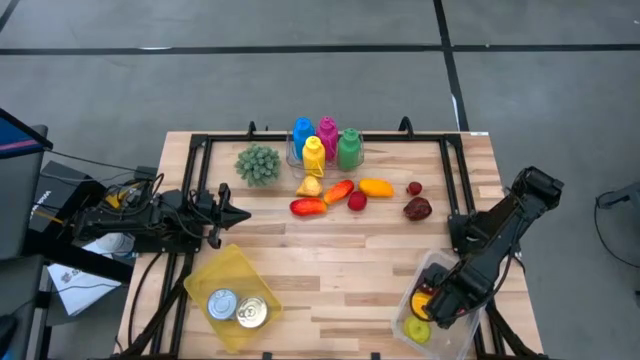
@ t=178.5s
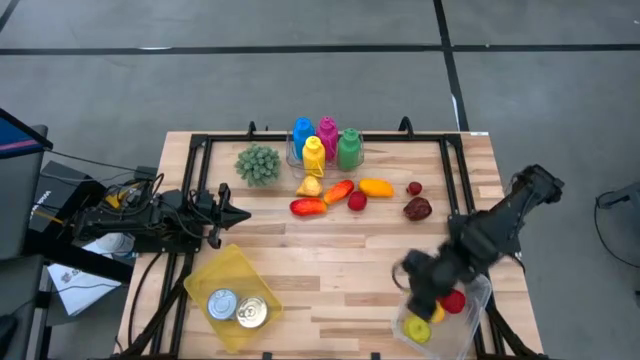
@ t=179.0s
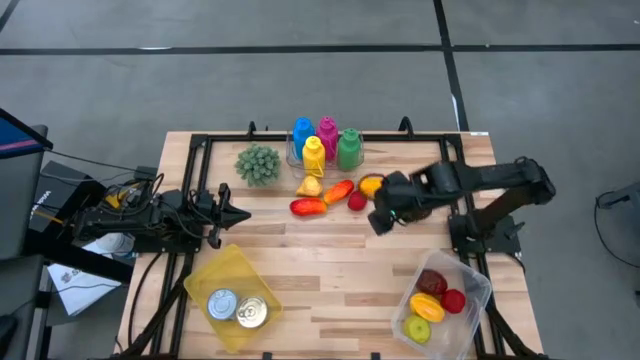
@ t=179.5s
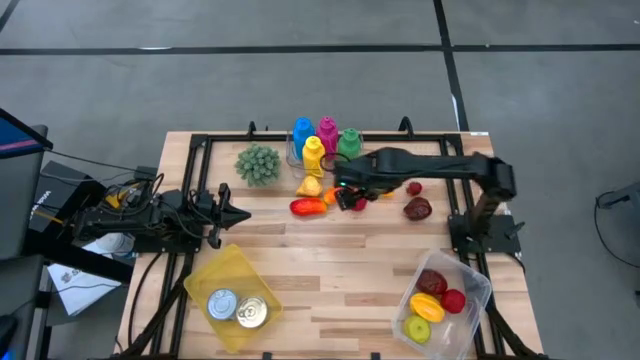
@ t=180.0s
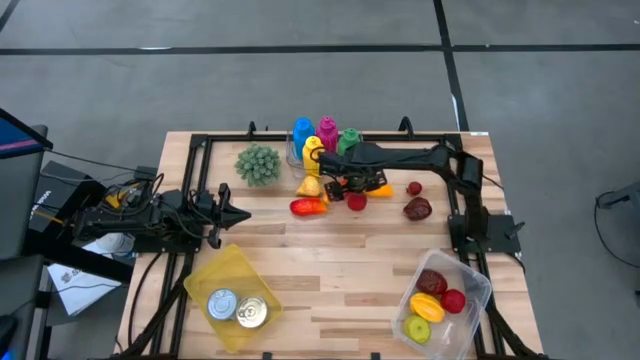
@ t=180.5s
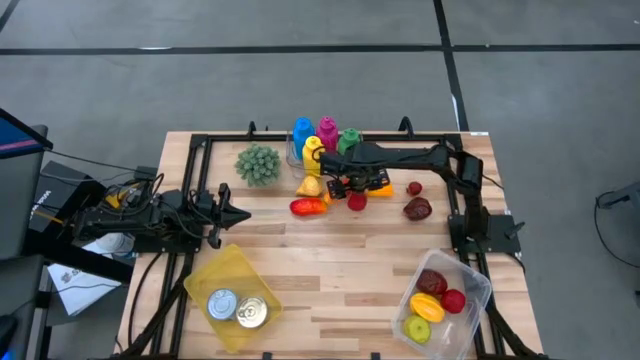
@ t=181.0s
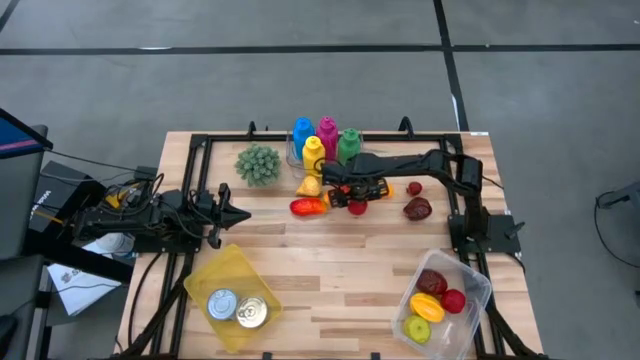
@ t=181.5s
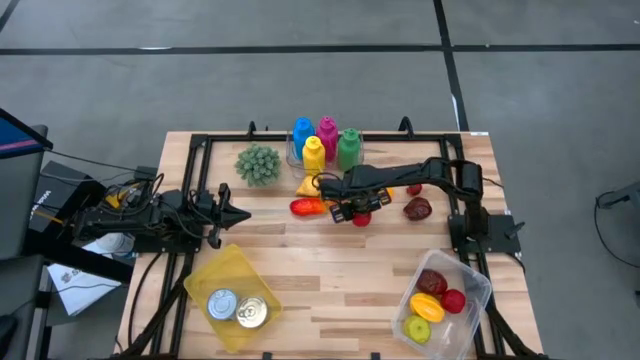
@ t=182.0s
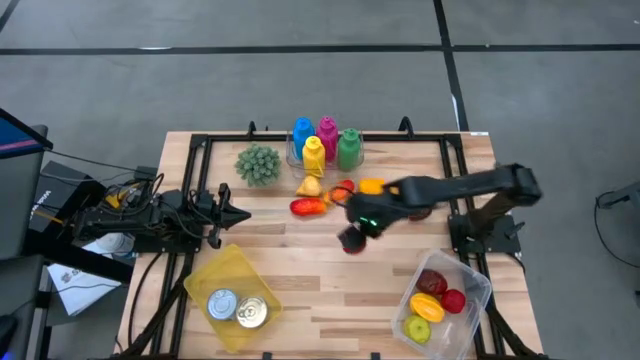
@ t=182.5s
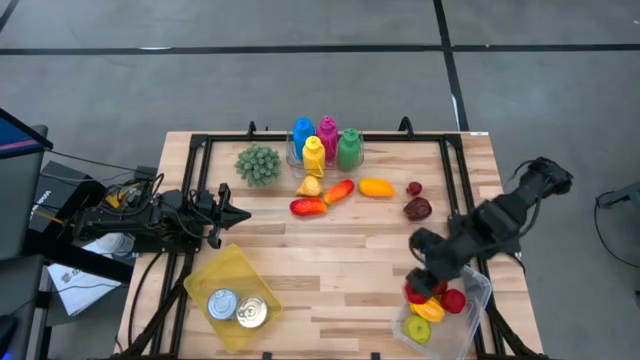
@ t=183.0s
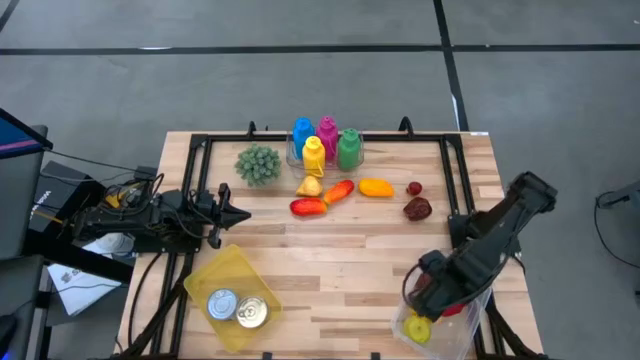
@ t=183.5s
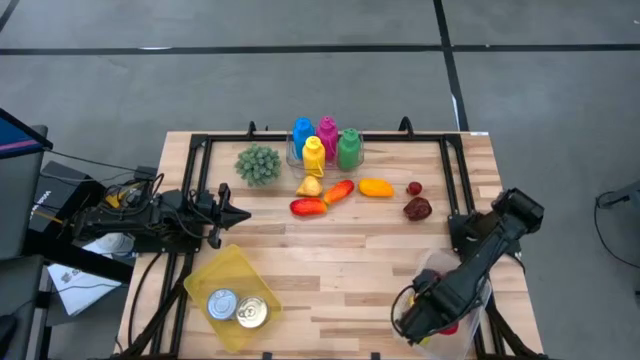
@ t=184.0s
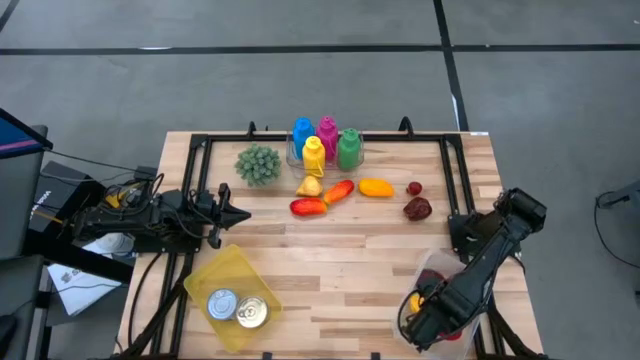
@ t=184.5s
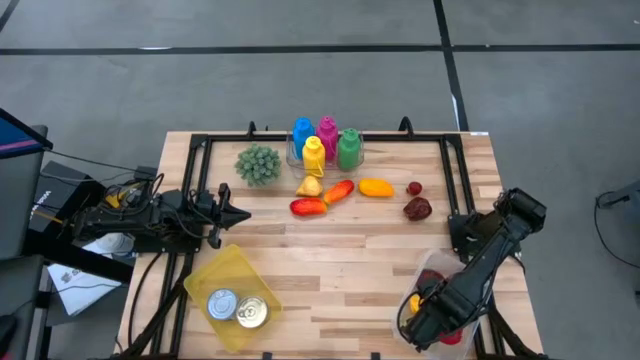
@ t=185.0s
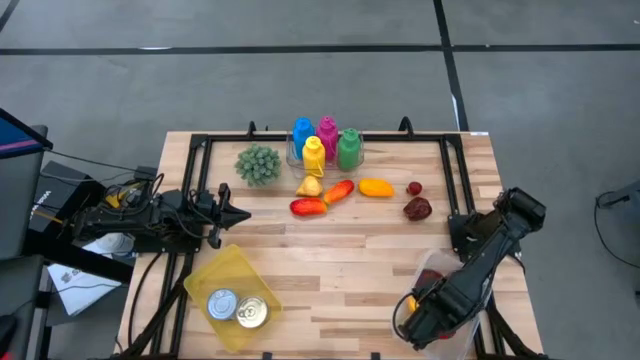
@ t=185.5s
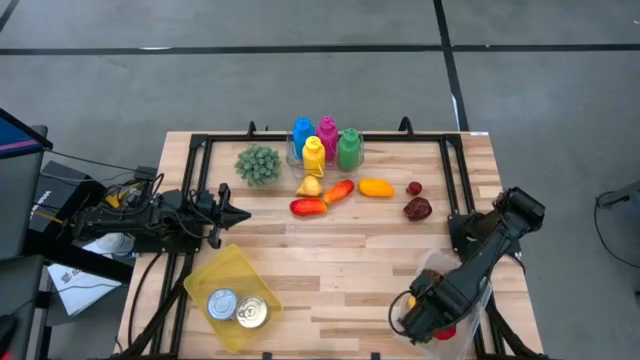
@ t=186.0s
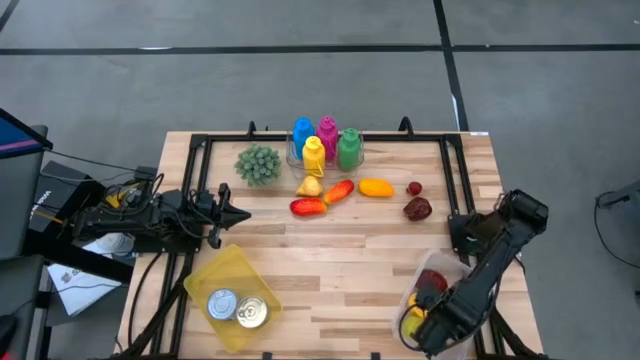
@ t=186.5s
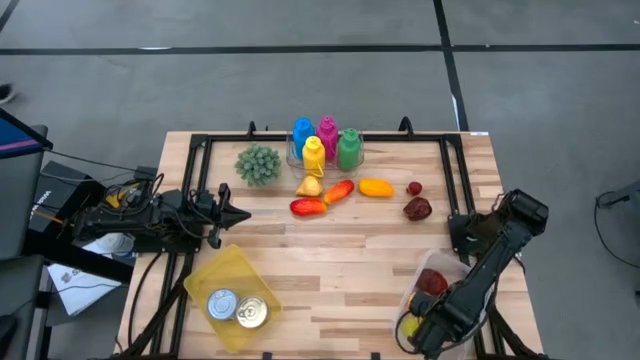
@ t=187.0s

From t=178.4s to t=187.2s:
Task: Pick & Place Food Item
Put the red tomato into the white bin

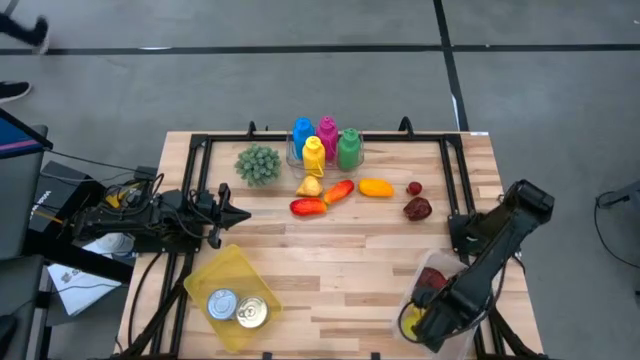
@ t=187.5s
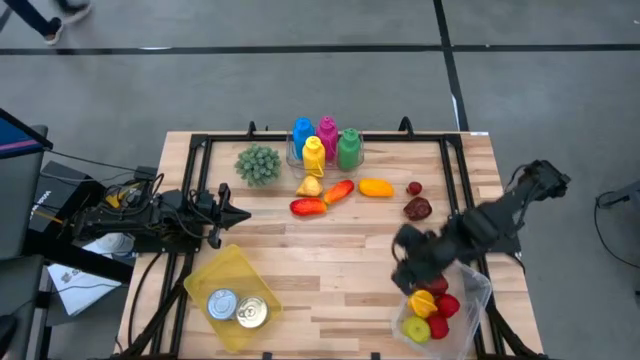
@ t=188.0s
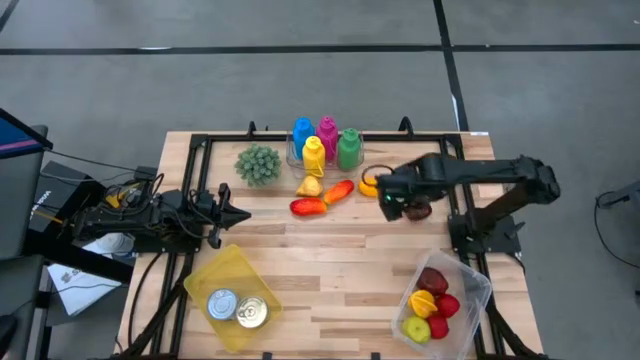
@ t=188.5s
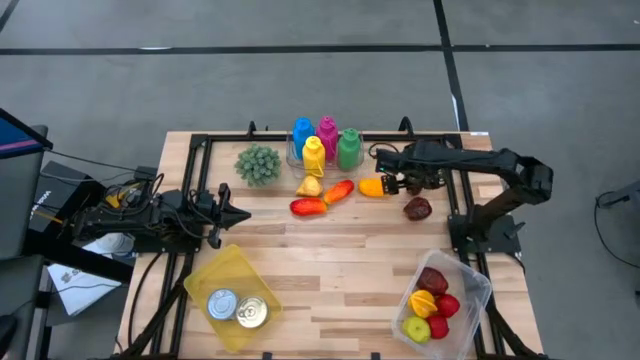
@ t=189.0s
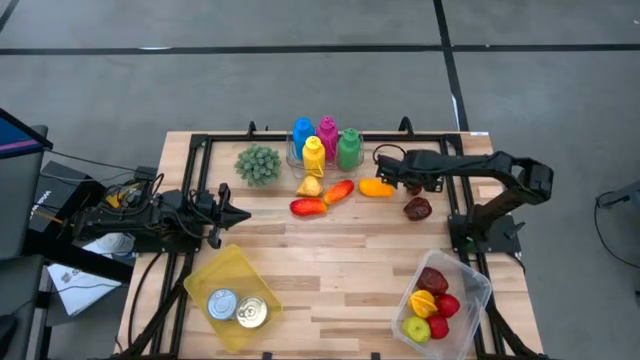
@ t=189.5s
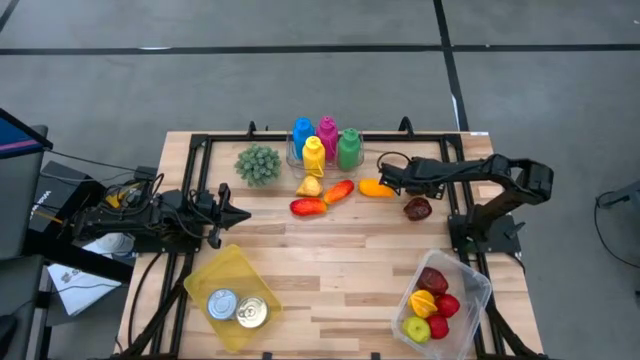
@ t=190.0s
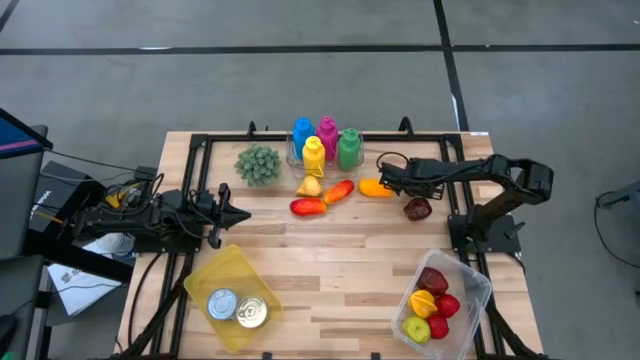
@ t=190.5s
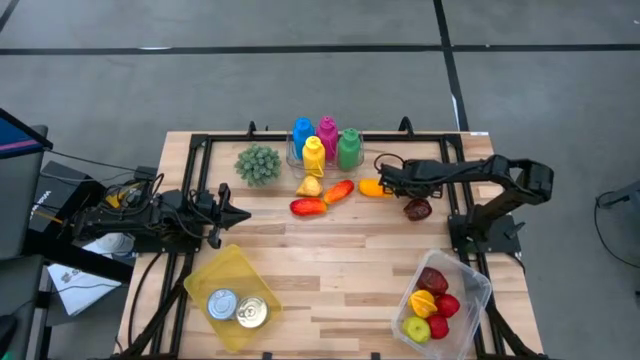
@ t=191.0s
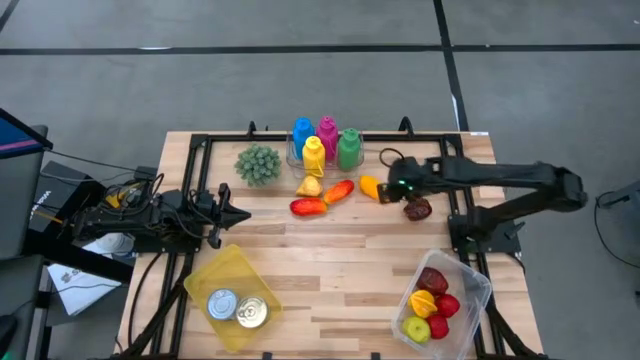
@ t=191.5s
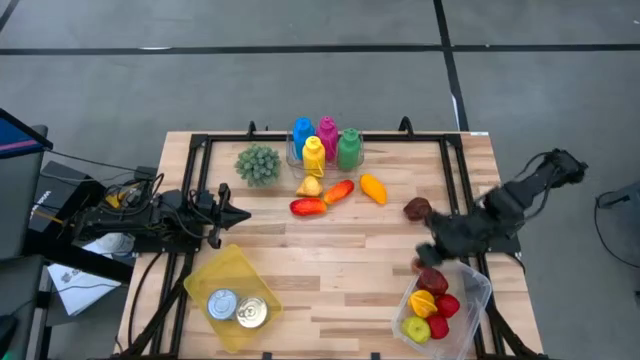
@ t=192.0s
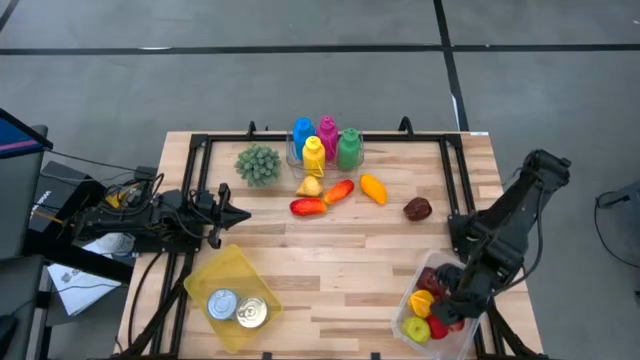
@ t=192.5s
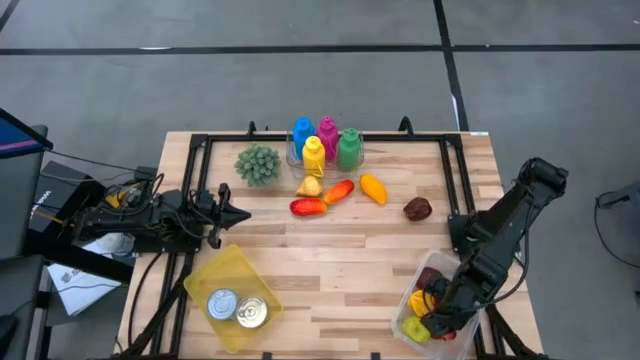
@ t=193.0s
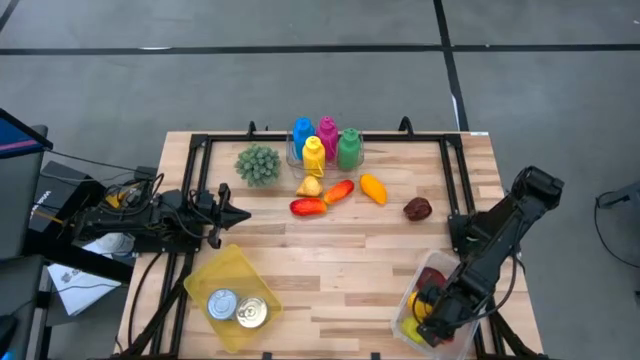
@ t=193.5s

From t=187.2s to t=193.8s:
Put the red pomegranate into the white bin

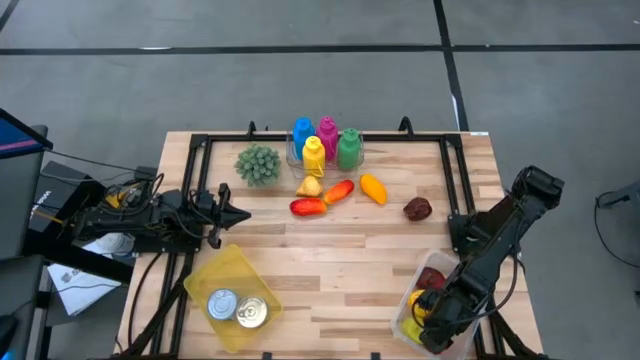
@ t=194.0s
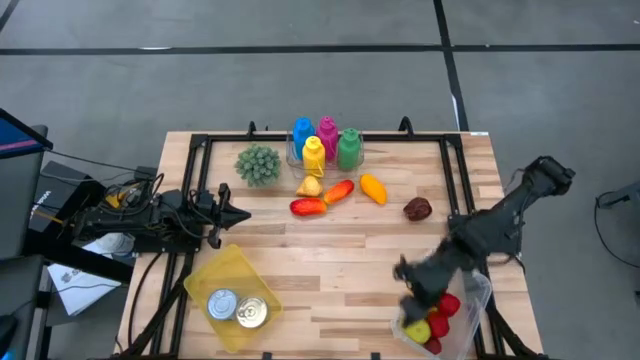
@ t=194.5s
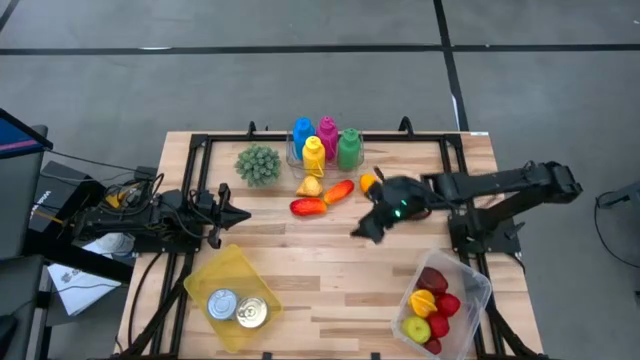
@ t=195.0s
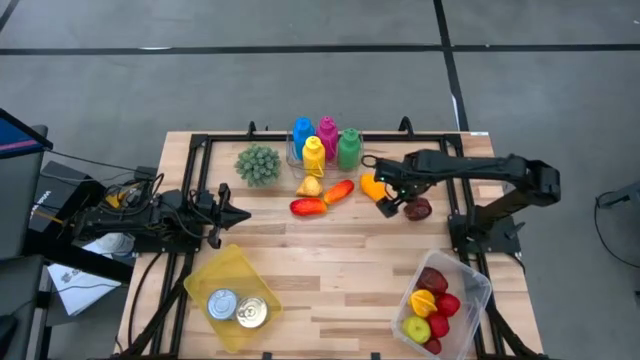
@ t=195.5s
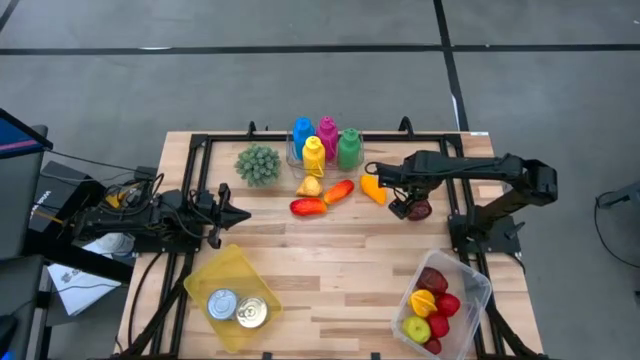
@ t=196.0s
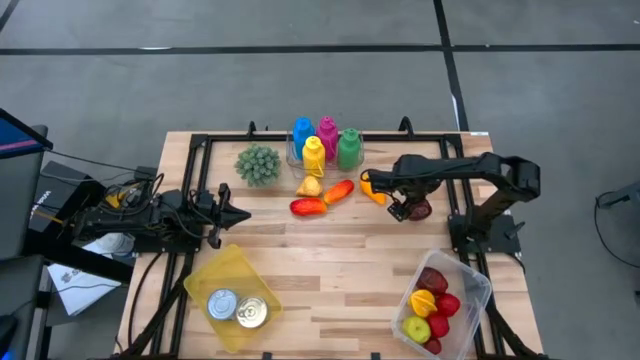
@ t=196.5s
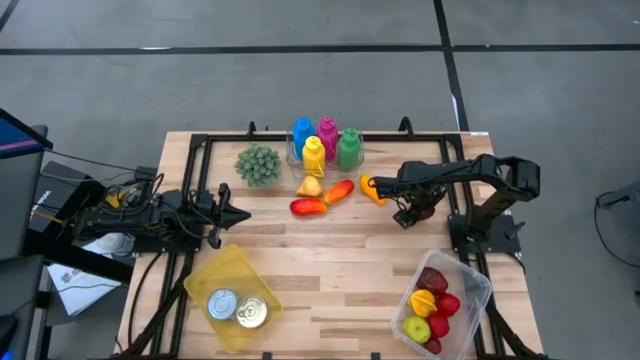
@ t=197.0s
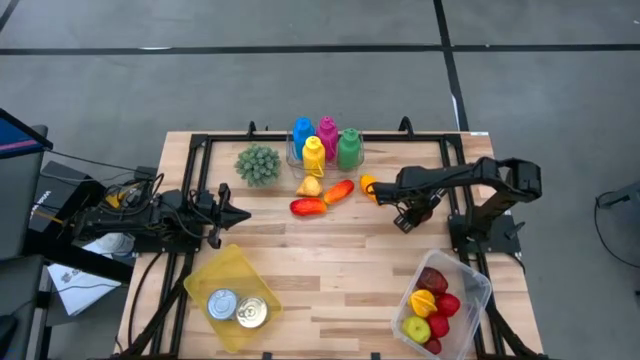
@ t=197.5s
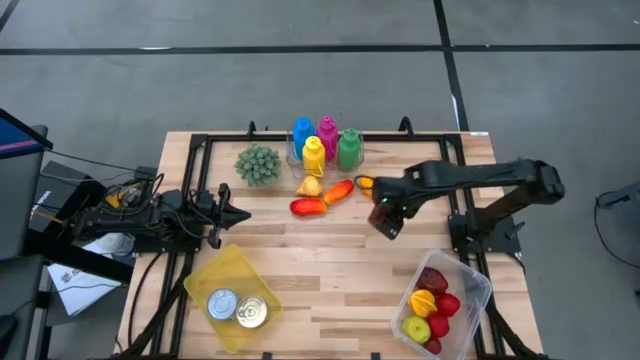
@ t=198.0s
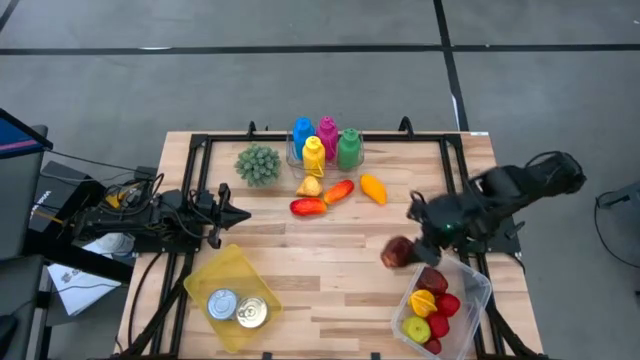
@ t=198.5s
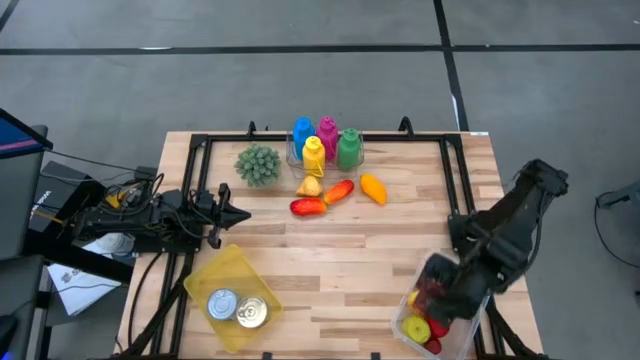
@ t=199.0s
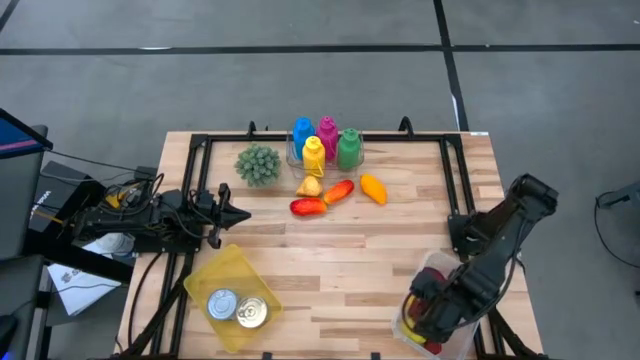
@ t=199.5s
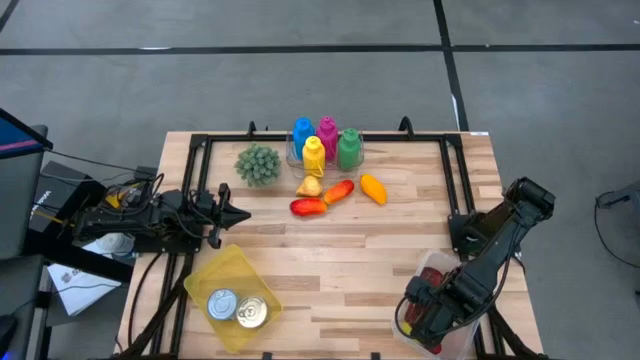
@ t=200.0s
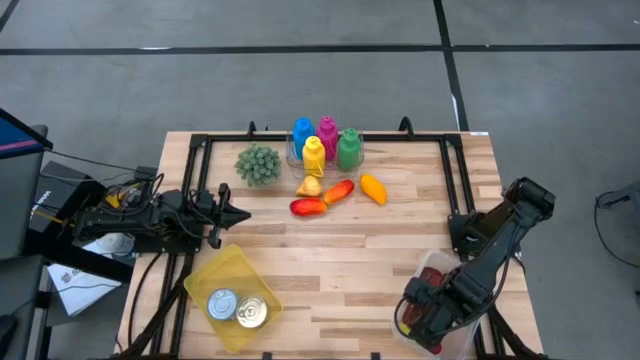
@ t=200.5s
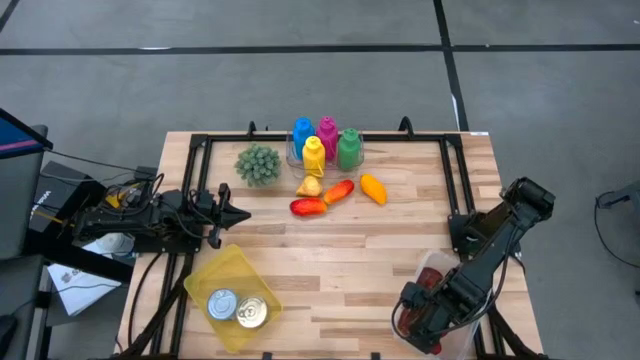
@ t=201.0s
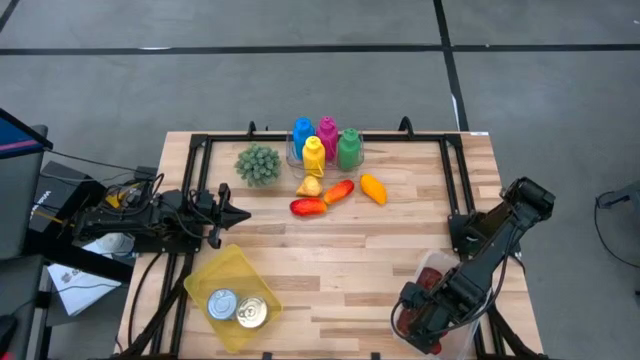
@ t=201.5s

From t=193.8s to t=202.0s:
Put the dark red apple into the white bin
